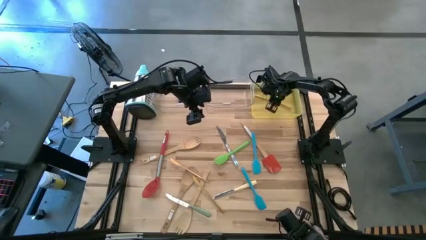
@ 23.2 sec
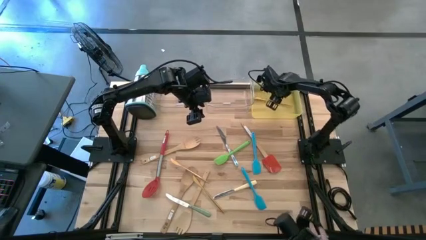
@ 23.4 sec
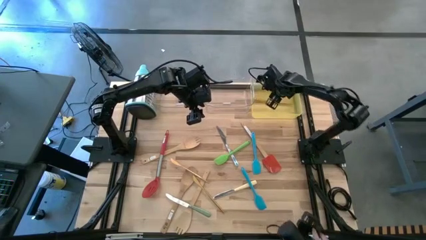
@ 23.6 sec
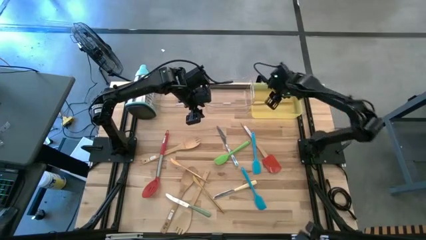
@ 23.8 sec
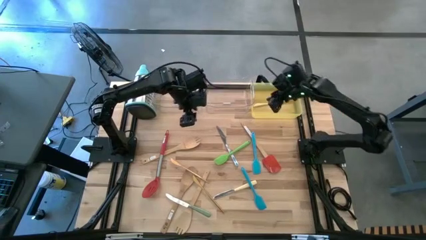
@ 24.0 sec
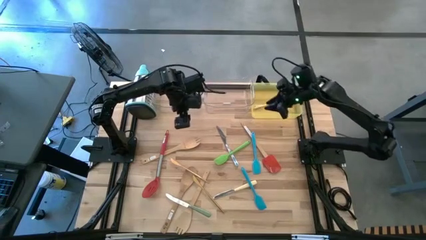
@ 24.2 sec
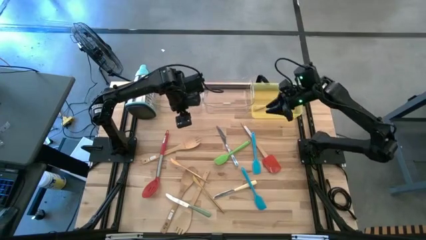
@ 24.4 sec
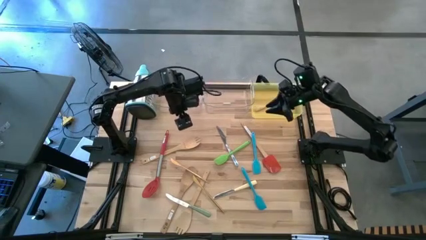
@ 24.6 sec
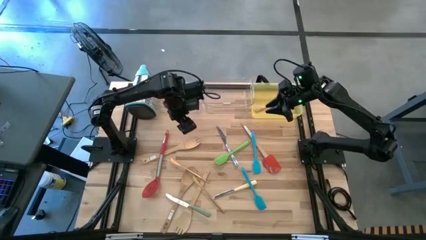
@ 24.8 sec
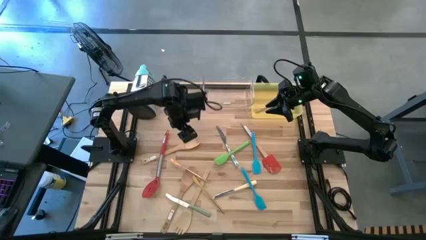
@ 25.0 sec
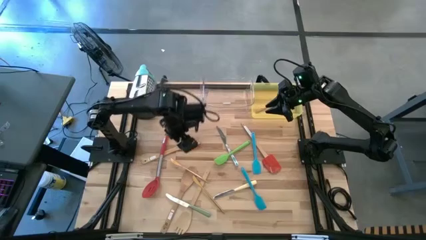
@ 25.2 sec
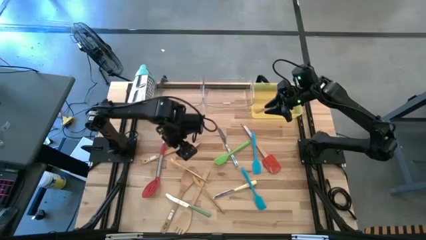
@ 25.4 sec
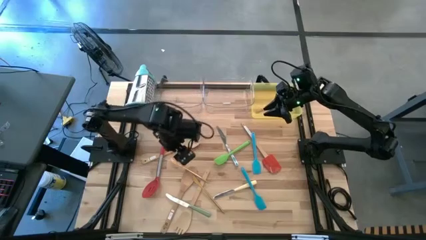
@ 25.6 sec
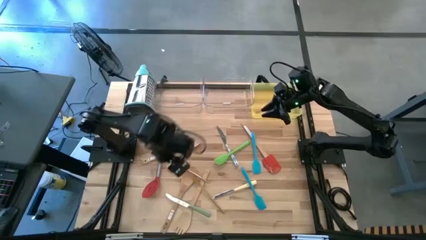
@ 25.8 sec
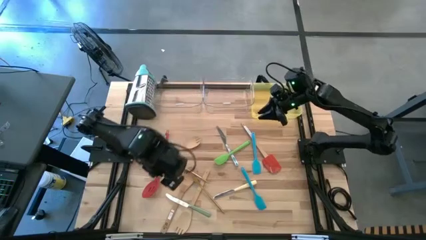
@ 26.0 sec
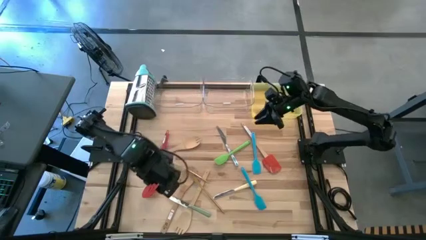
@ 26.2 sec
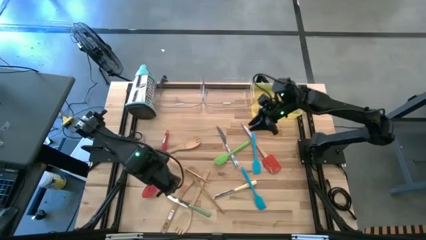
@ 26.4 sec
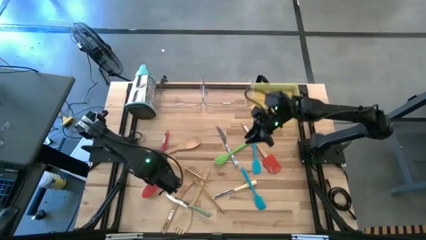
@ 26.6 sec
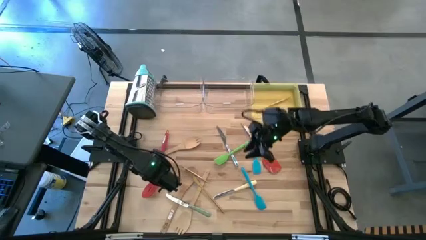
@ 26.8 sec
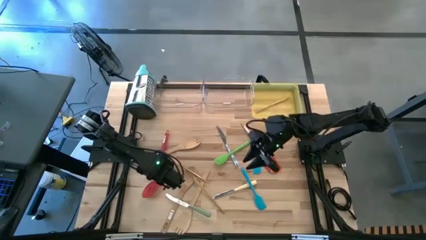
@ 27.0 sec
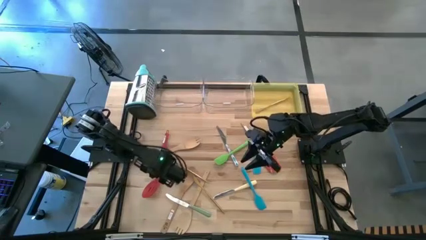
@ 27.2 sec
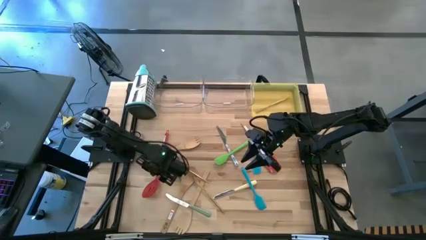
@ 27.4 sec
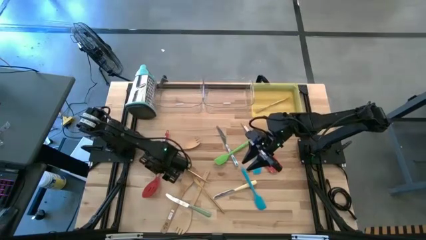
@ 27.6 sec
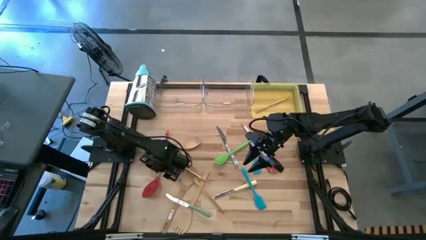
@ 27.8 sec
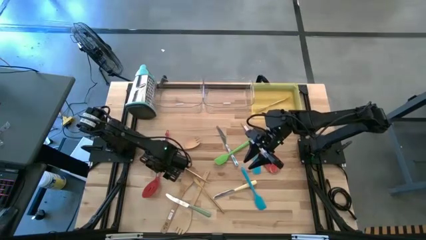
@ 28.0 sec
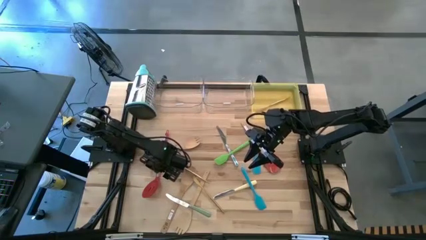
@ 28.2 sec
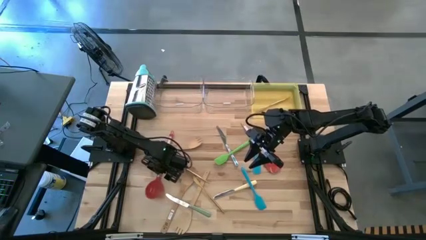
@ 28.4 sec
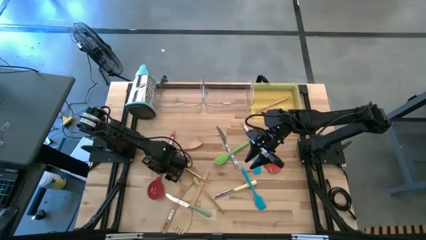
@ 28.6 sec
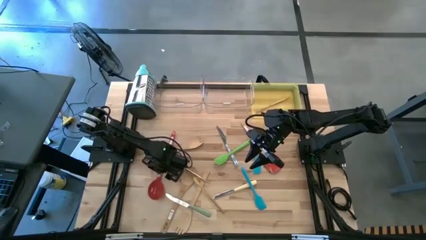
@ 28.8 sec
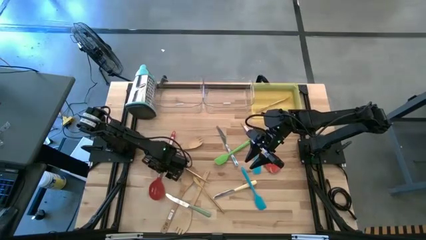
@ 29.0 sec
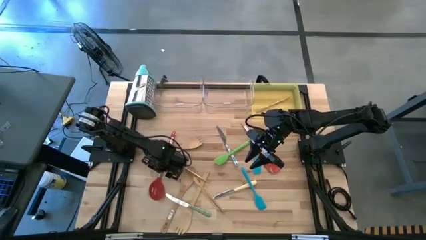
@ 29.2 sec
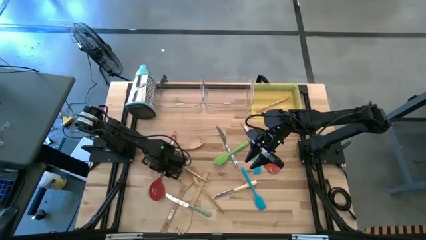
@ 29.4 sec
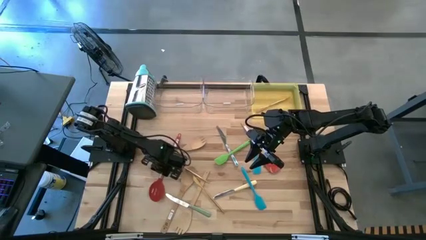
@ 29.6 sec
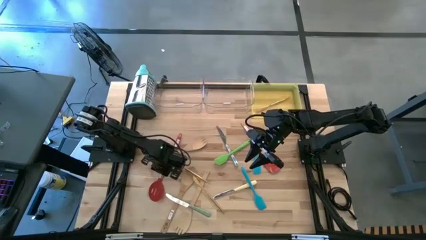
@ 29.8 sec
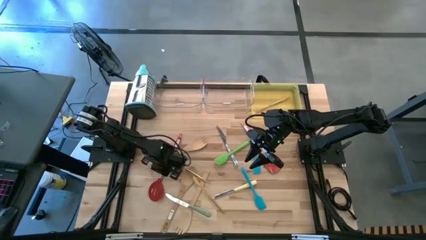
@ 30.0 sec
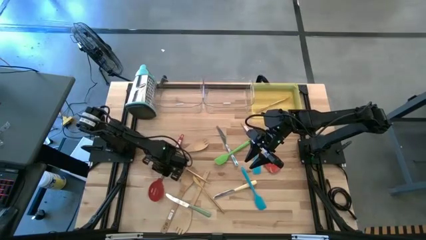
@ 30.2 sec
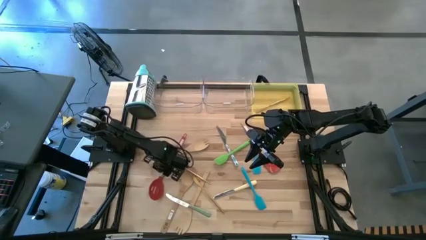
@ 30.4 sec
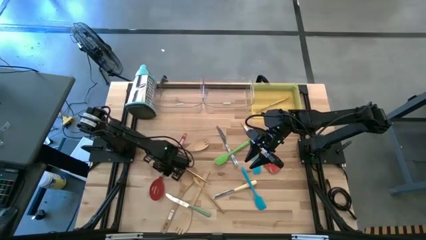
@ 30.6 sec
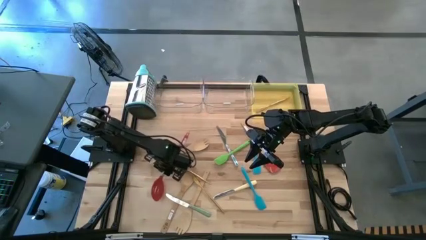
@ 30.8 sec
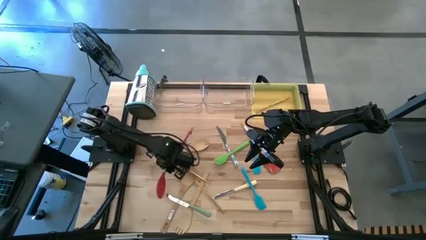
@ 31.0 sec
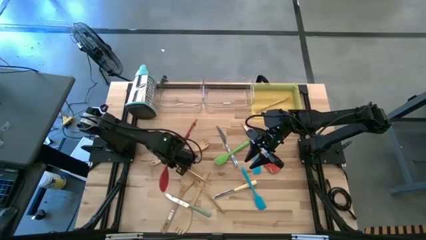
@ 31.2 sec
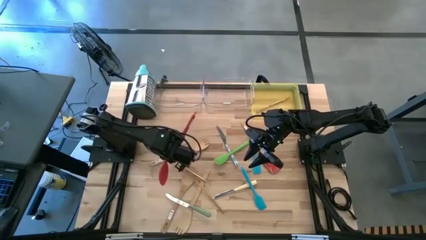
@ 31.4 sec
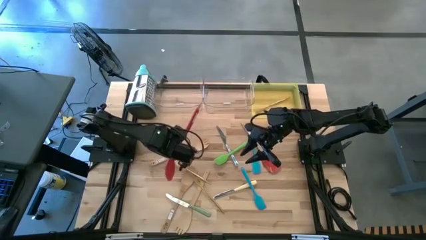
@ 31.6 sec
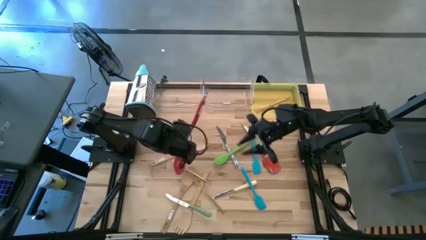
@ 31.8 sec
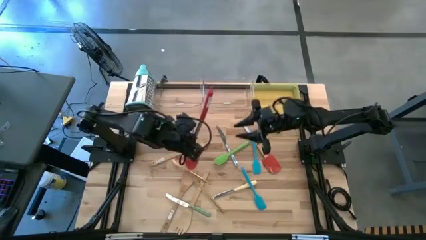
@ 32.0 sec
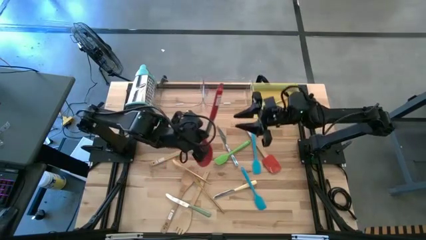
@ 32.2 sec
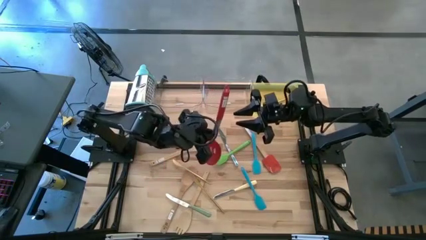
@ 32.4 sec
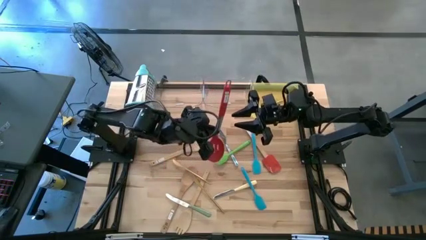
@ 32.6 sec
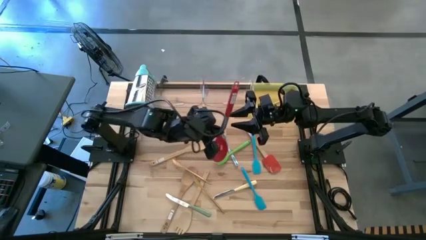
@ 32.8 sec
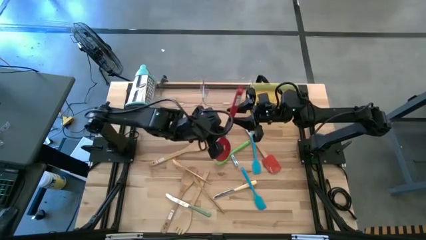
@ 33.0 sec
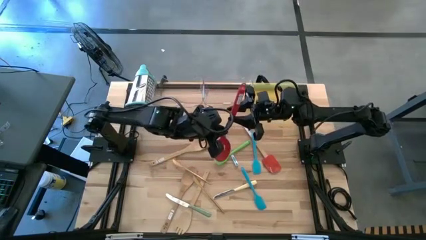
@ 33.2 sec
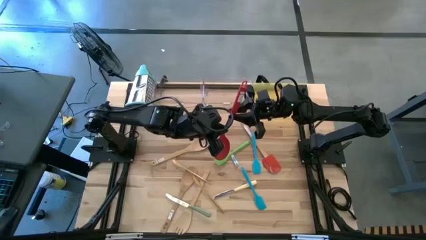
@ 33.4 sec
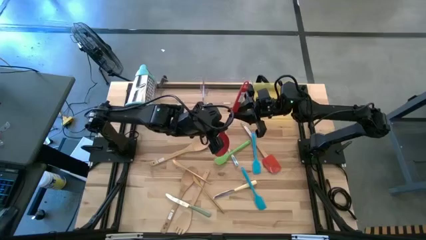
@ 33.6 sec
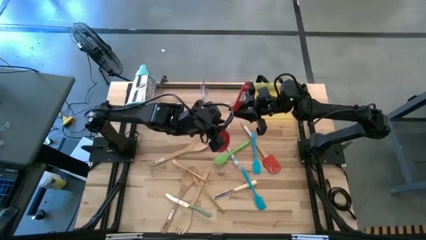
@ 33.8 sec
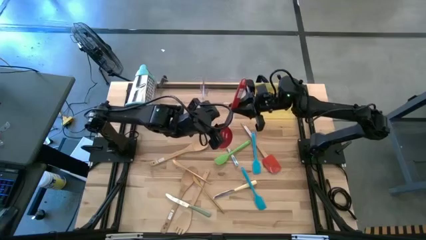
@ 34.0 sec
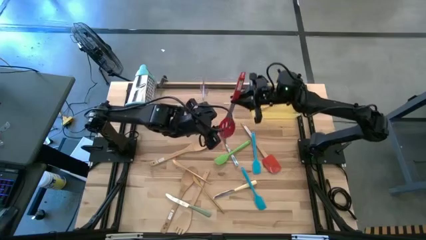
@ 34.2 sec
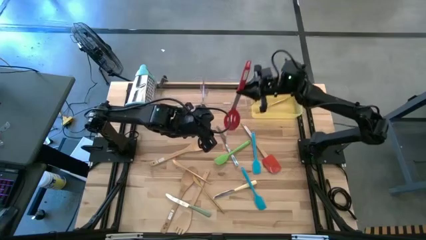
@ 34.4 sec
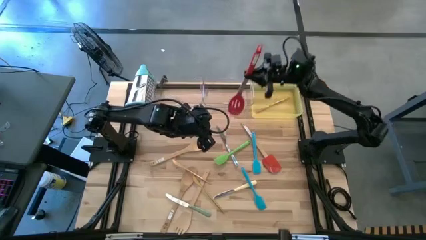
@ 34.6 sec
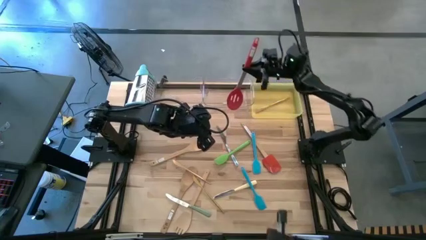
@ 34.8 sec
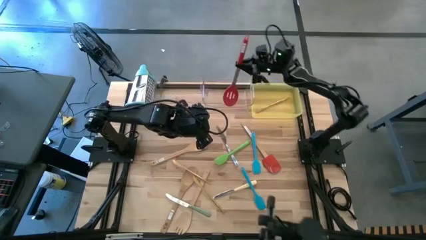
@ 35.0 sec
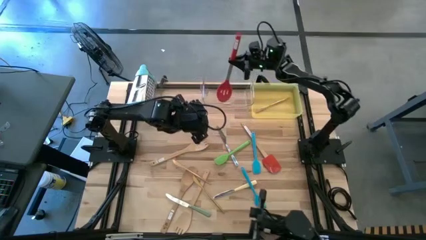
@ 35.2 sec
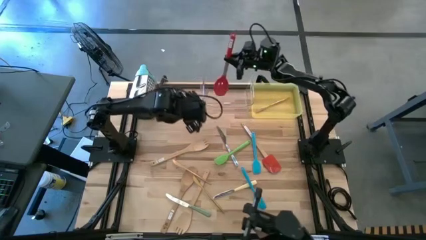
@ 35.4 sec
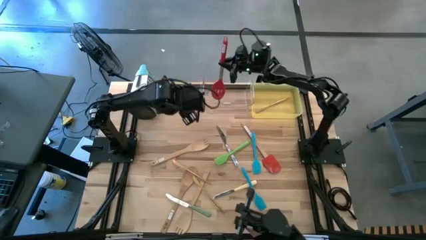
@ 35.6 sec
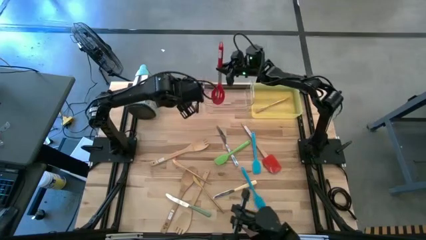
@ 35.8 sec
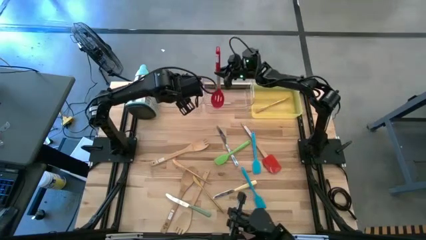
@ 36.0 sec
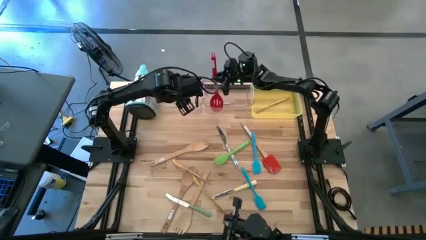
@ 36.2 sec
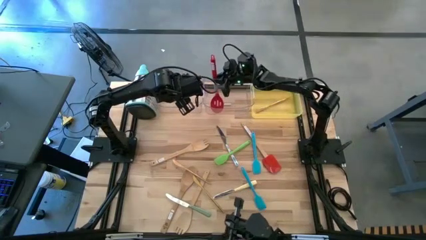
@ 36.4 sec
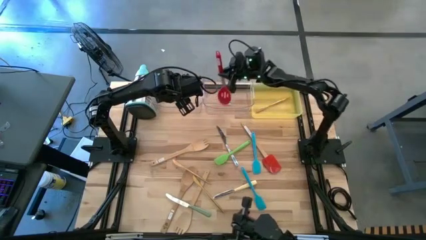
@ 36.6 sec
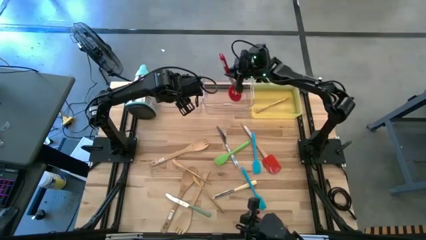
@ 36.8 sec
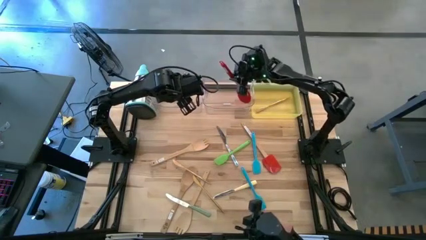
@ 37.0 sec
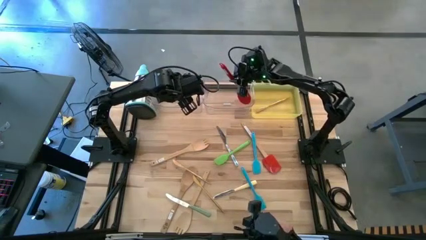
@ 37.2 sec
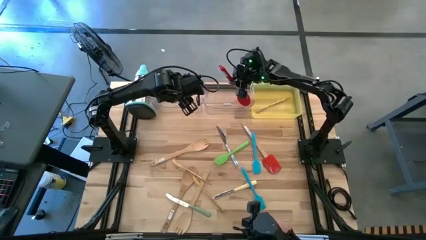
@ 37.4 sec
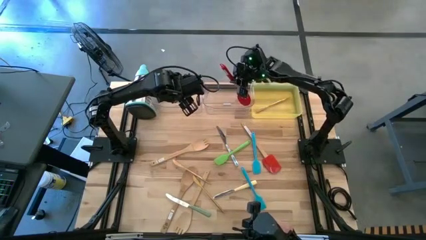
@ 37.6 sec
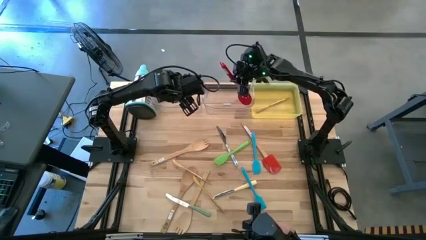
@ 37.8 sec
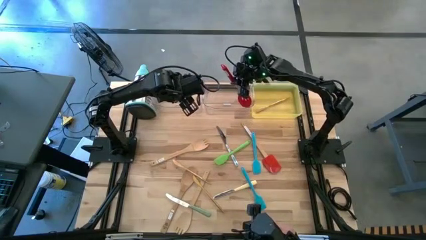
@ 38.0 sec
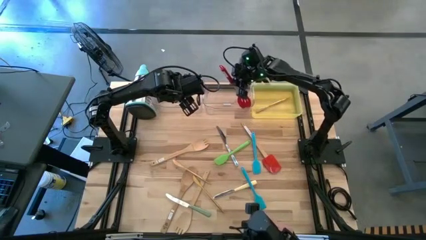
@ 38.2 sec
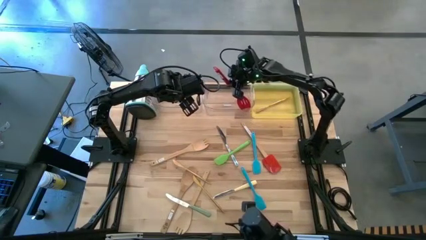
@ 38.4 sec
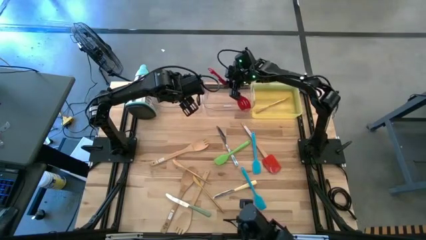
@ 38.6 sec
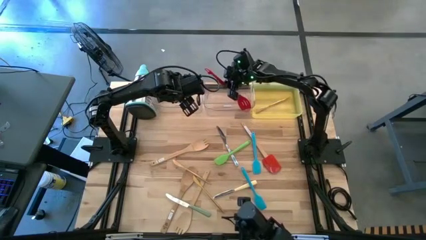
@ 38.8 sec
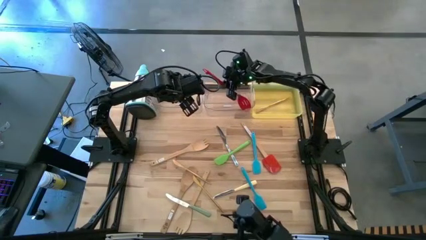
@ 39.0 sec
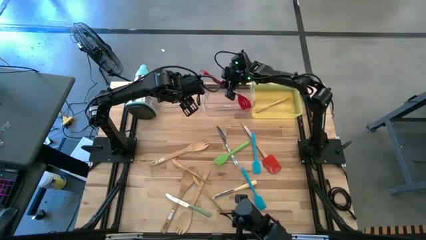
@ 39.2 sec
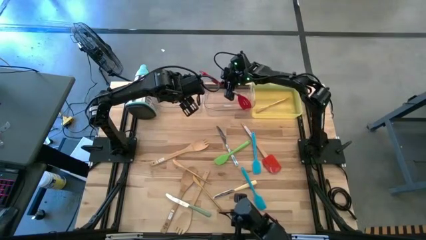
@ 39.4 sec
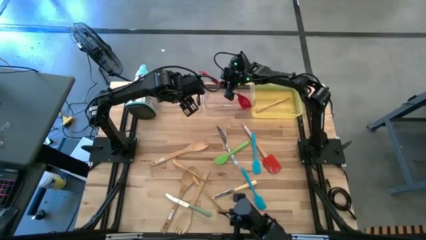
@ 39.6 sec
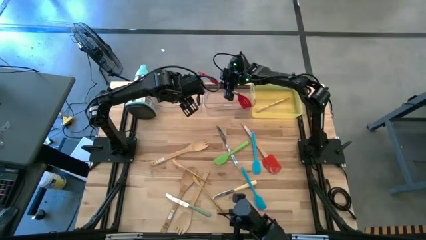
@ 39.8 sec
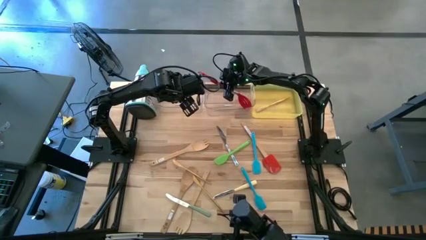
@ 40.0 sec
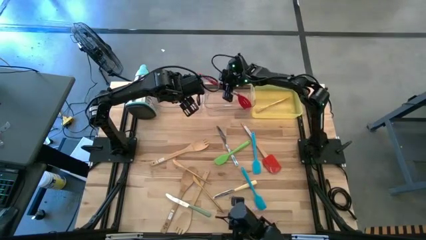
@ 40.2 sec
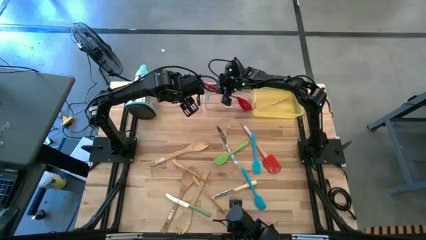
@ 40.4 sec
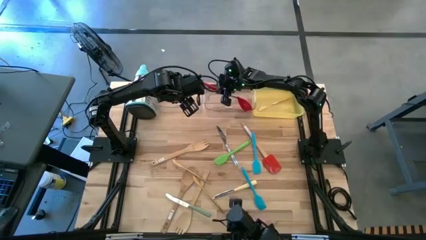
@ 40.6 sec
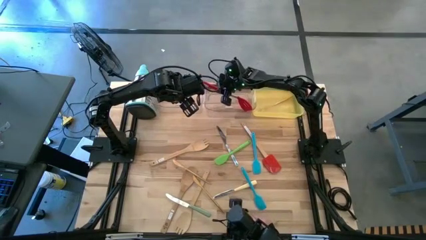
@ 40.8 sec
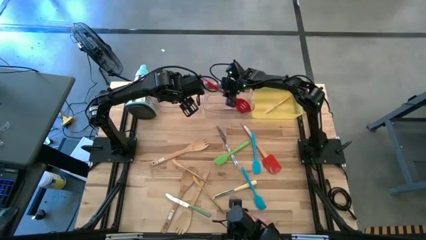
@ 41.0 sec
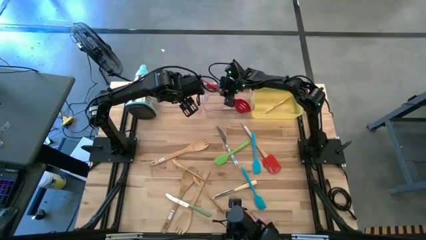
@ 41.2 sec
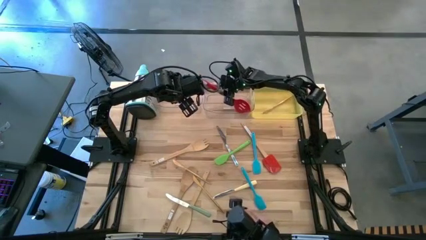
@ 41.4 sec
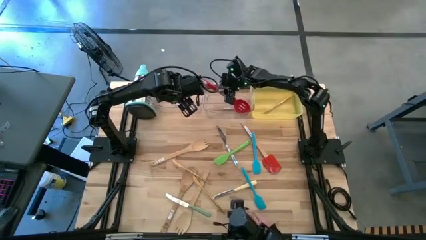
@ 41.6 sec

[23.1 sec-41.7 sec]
Task: Pick & Place Kitchen Items
Put the red serving spoon into the right transparent bin
